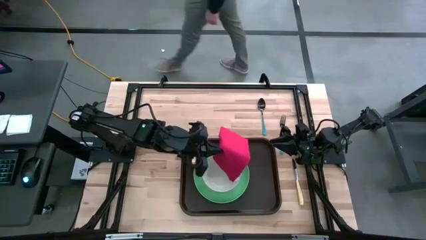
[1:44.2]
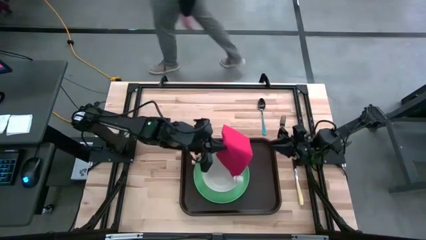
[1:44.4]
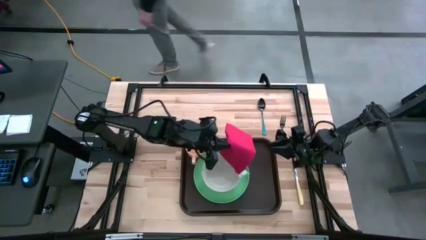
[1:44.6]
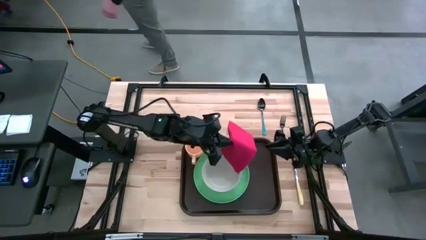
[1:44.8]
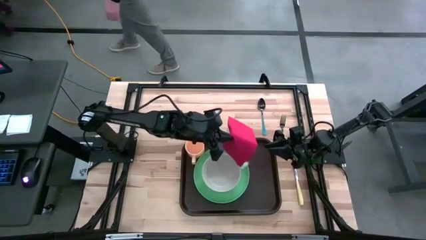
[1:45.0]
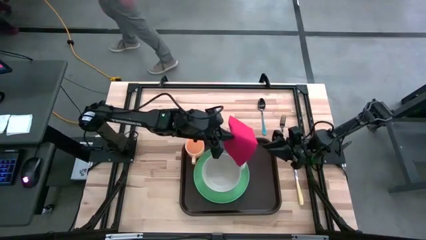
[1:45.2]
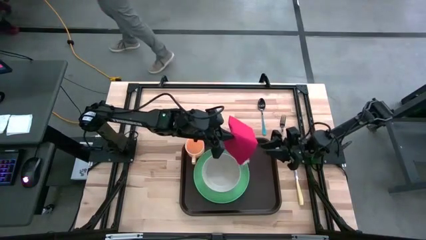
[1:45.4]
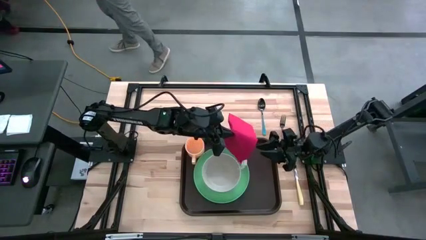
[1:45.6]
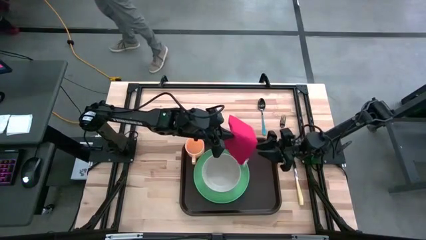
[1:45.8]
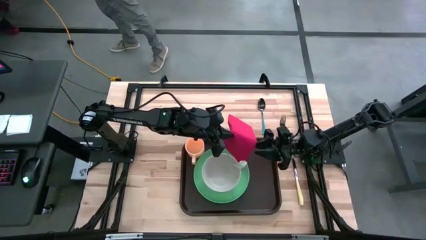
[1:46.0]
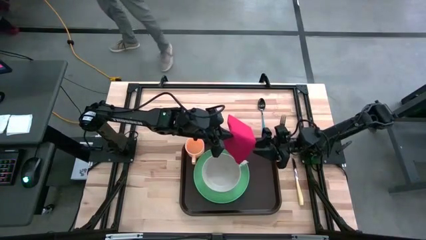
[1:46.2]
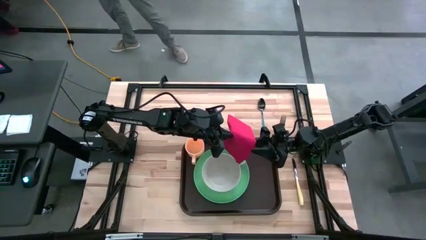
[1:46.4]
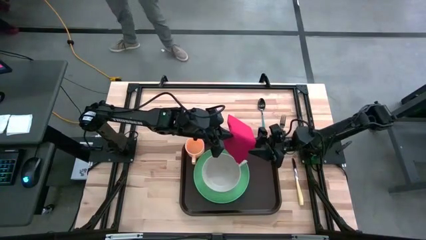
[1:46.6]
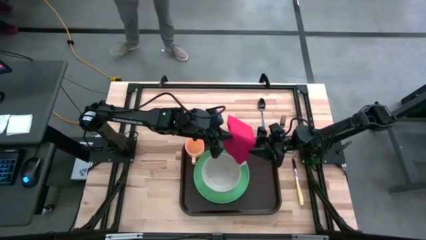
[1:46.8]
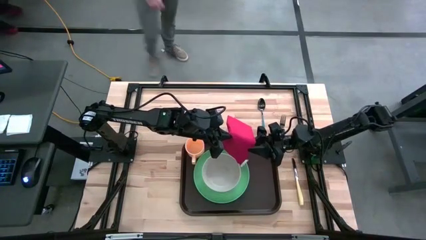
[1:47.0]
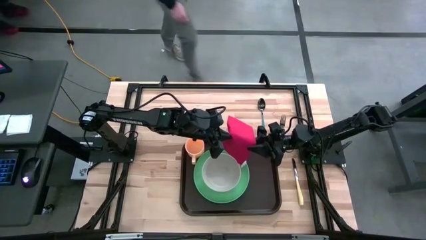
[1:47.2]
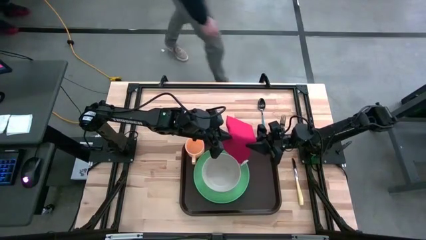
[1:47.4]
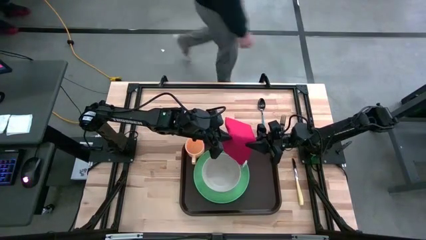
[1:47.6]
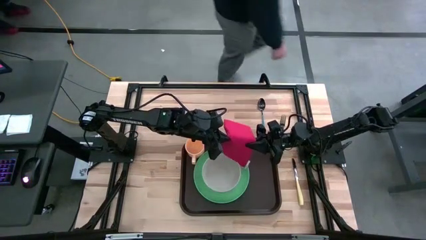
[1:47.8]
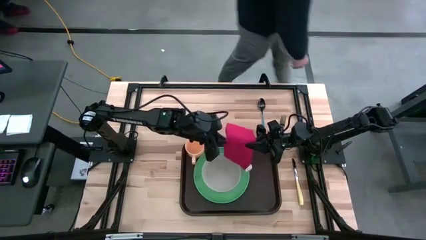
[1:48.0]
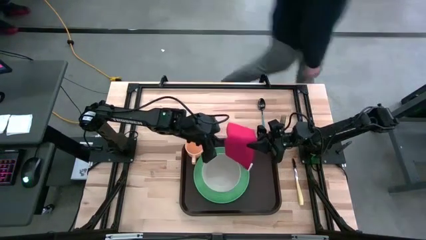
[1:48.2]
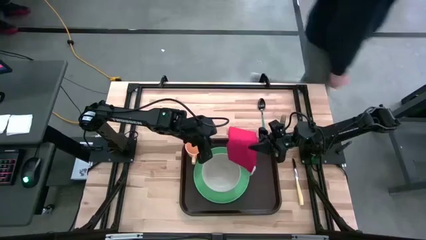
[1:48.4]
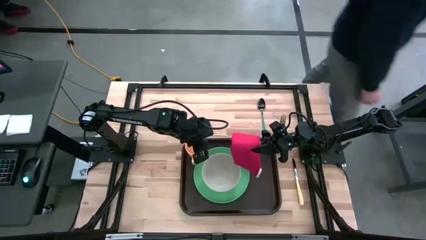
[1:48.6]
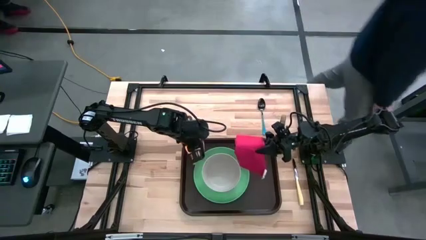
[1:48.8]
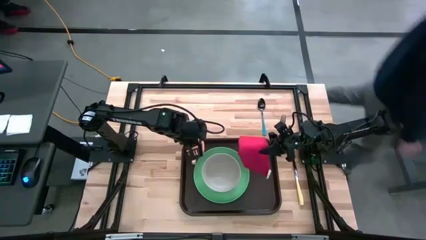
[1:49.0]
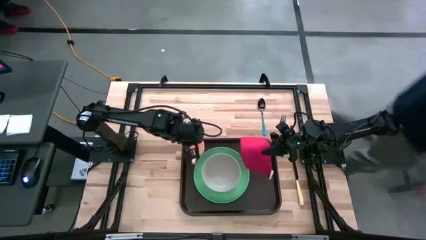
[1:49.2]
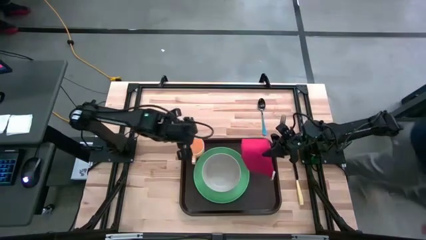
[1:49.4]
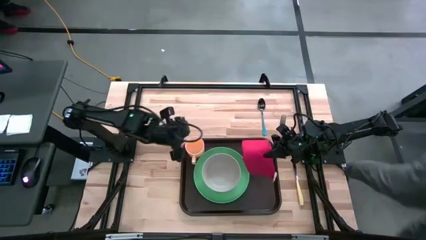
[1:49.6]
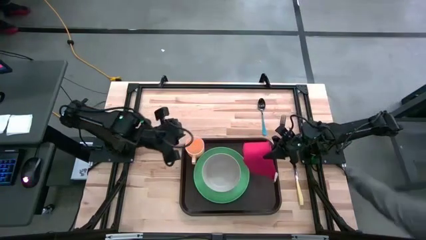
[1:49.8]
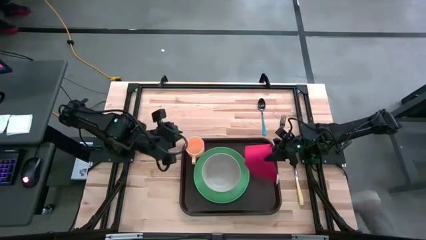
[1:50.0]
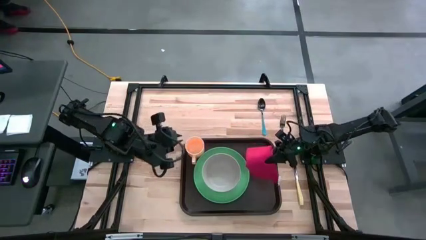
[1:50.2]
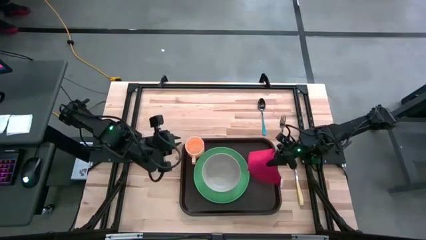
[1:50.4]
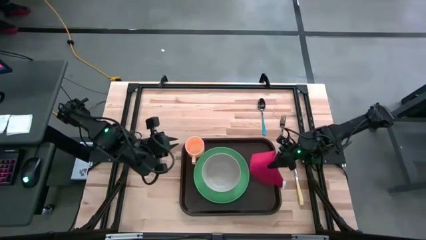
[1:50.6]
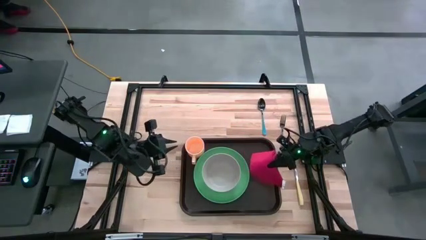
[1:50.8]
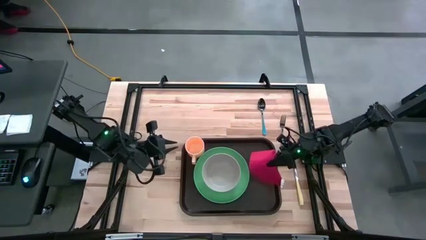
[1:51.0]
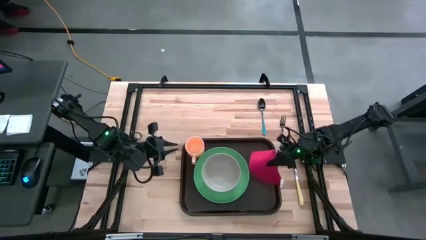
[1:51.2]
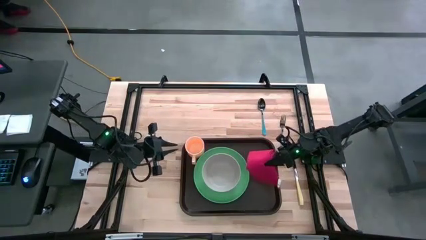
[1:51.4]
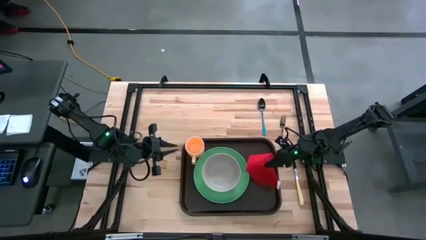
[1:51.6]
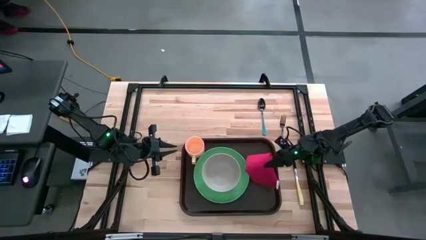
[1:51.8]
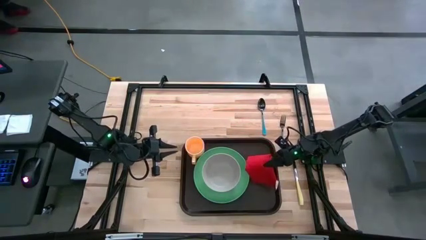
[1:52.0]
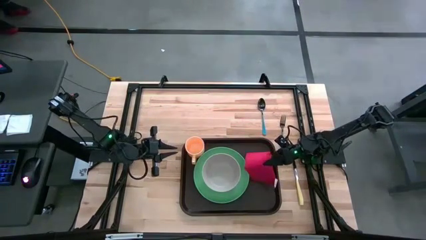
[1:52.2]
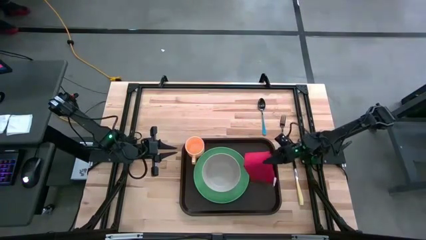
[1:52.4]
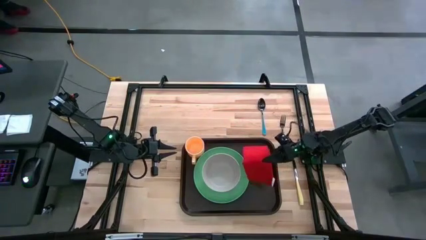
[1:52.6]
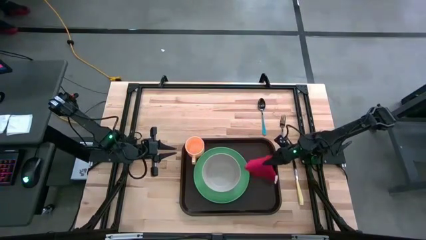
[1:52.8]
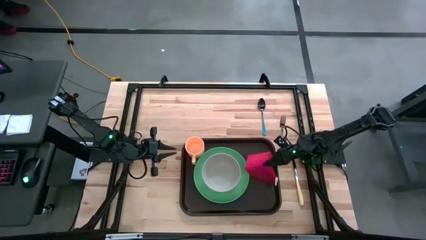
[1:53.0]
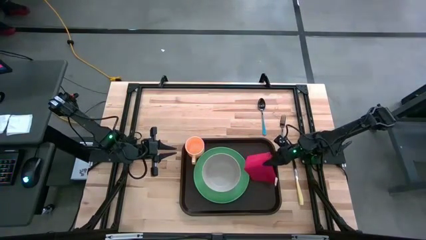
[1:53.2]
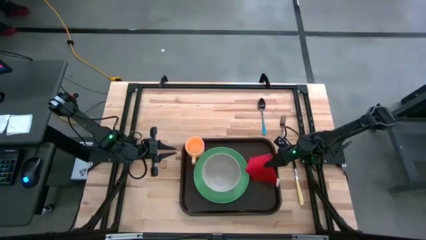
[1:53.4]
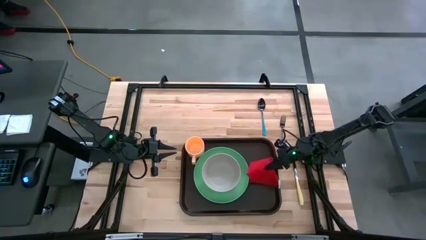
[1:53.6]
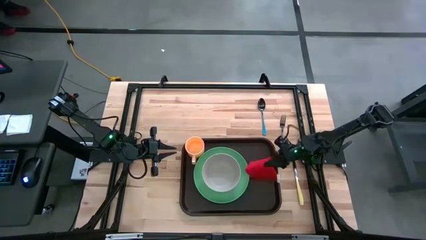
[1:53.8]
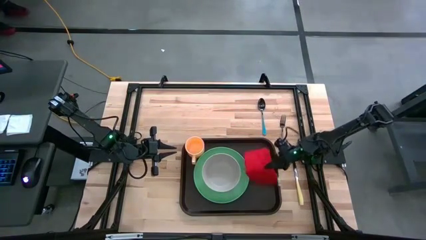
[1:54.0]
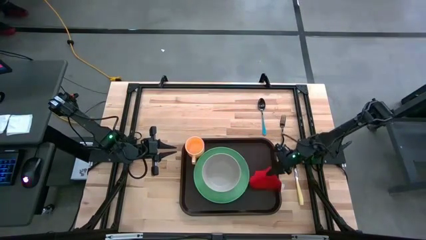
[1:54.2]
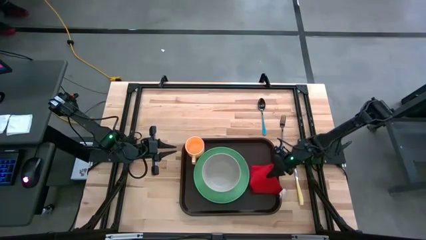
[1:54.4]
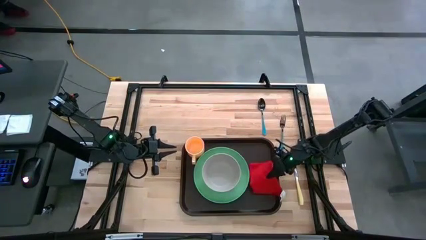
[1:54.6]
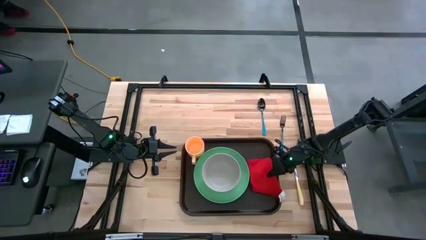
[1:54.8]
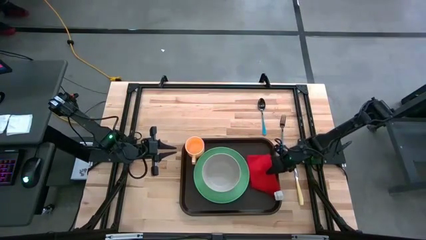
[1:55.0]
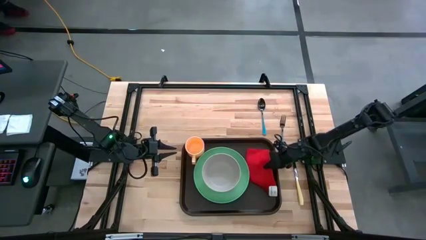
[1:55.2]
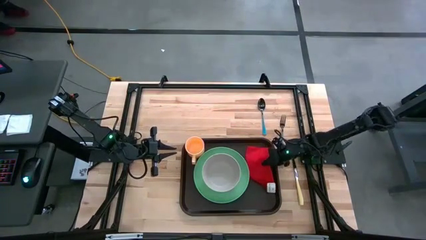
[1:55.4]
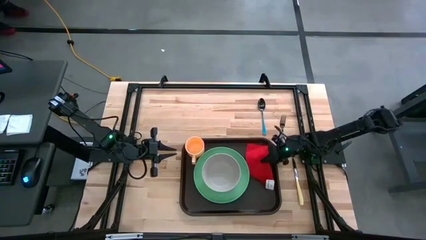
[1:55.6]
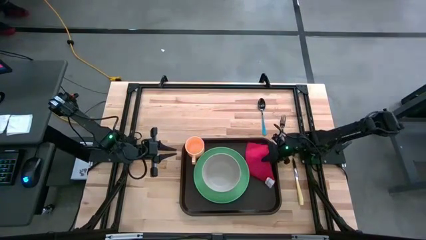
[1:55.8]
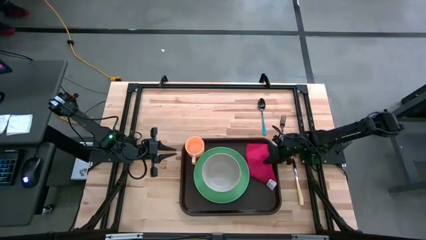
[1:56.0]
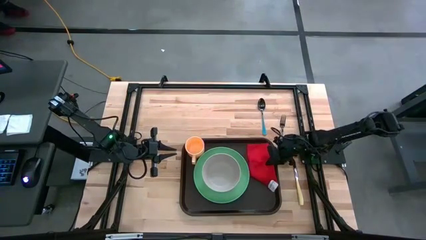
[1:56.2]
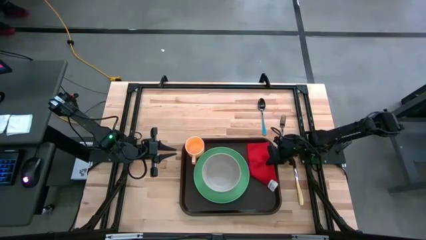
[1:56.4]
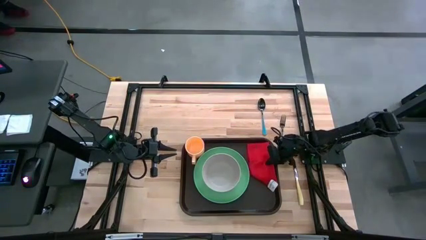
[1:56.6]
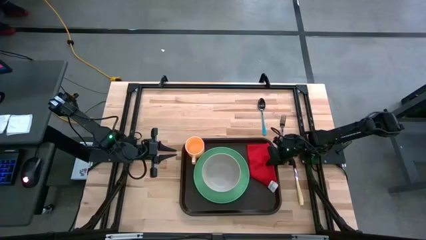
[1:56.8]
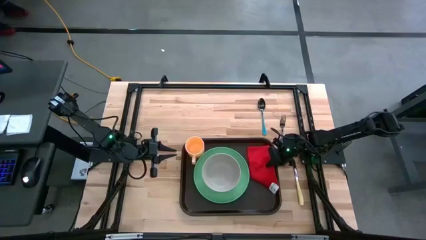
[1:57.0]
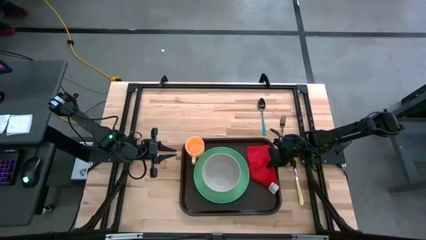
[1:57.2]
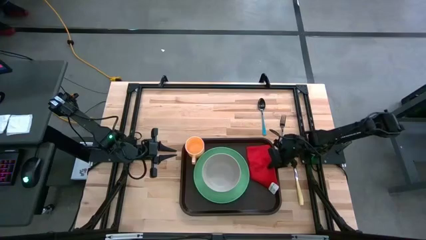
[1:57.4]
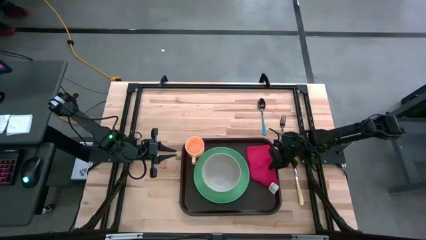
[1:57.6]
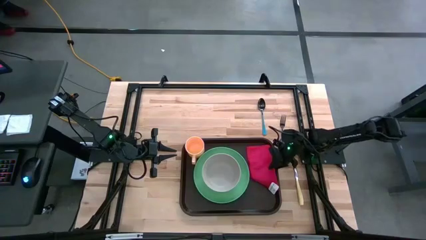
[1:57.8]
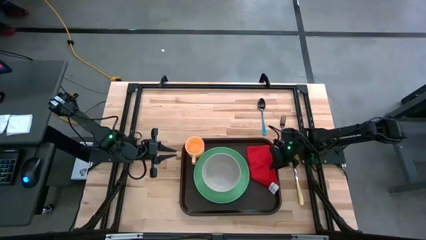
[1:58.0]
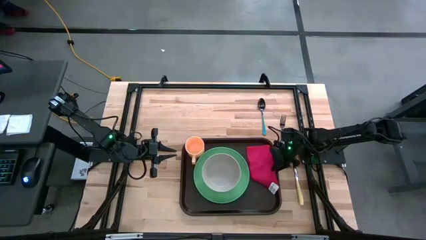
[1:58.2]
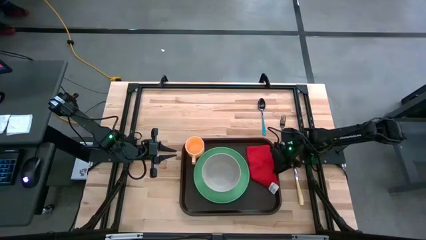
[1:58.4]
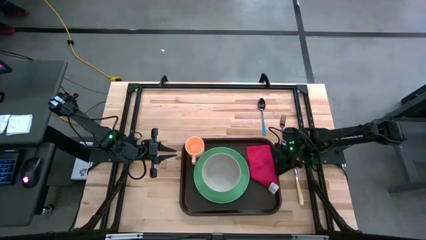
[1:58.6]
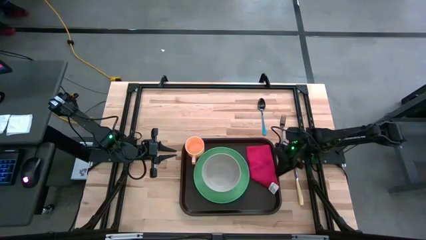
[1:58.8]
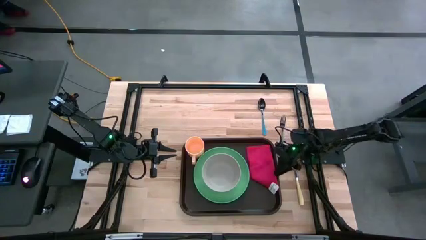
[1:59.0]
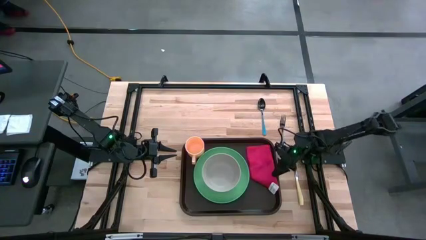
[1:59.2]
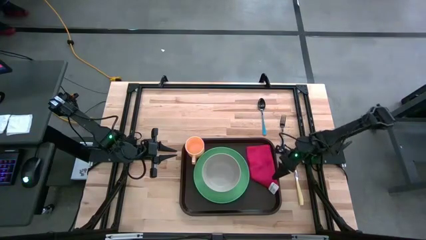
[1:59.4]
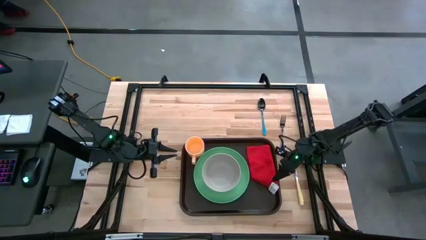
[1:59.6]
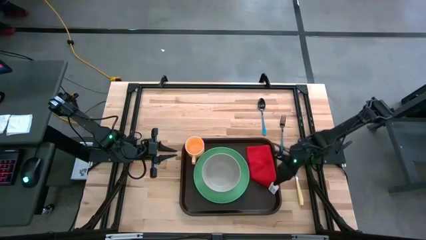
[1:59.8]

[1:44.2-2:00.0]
Task: Set up tray
Put the red table napkin on the black tray to the right of the green plate
